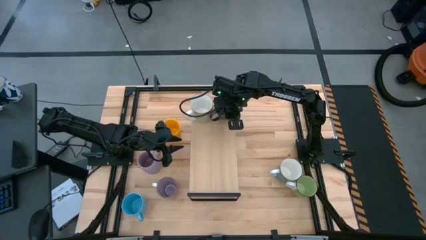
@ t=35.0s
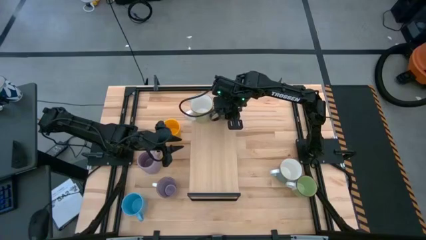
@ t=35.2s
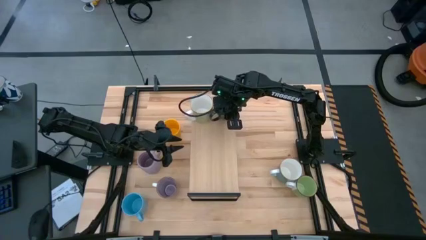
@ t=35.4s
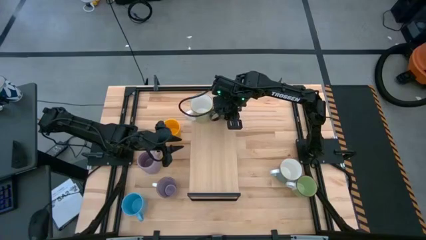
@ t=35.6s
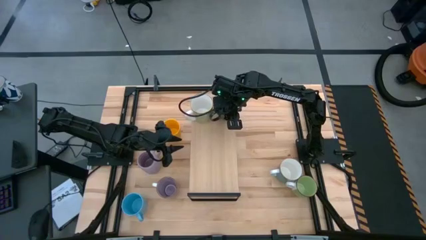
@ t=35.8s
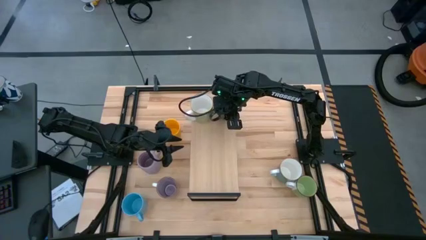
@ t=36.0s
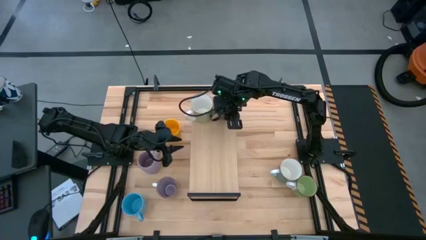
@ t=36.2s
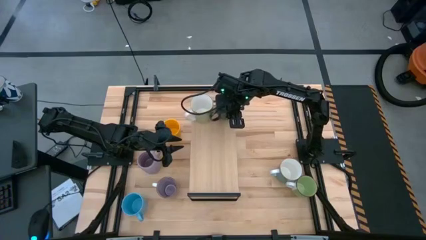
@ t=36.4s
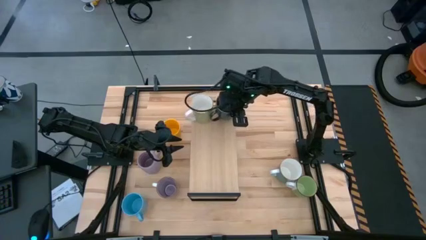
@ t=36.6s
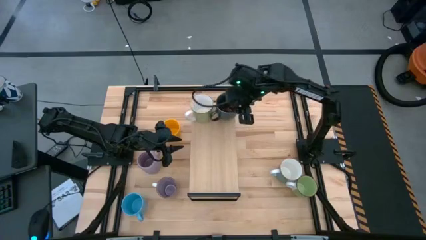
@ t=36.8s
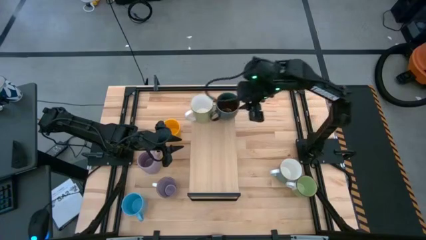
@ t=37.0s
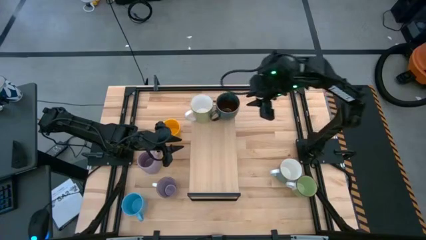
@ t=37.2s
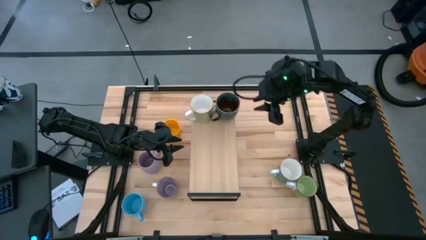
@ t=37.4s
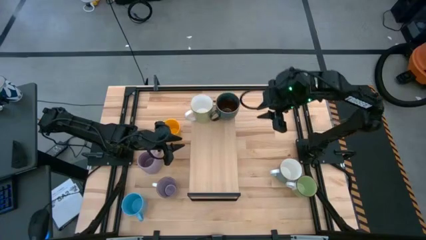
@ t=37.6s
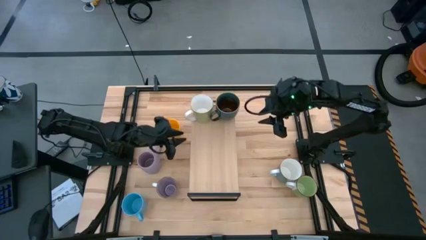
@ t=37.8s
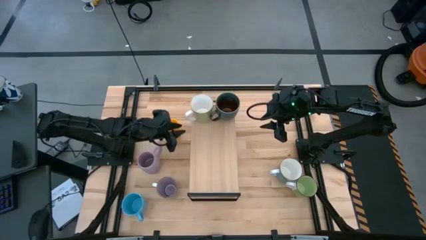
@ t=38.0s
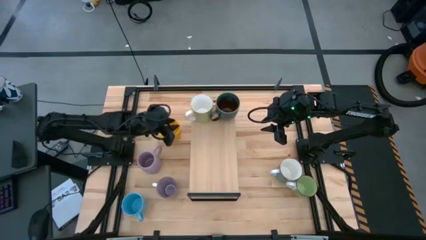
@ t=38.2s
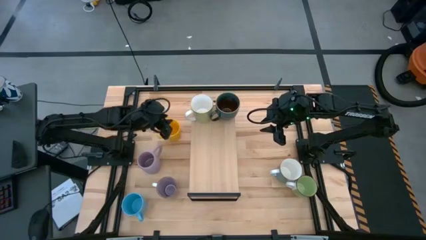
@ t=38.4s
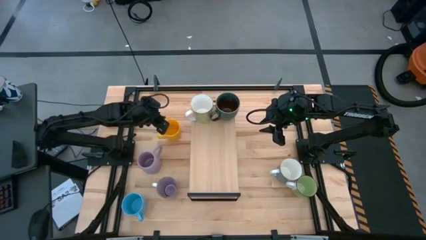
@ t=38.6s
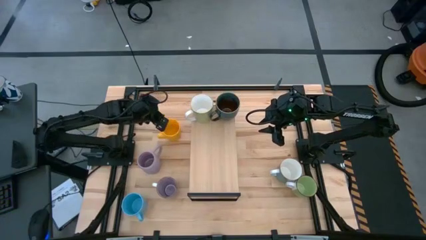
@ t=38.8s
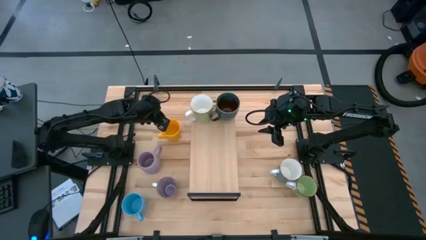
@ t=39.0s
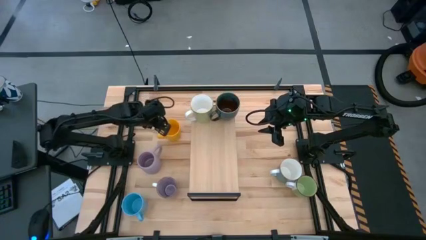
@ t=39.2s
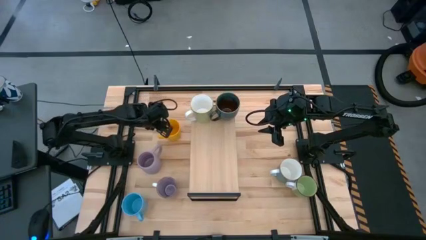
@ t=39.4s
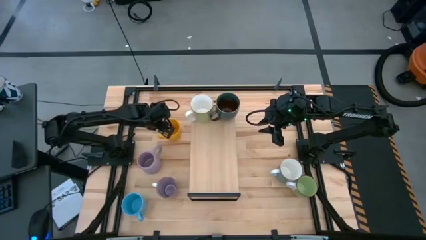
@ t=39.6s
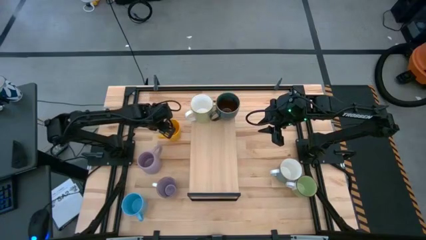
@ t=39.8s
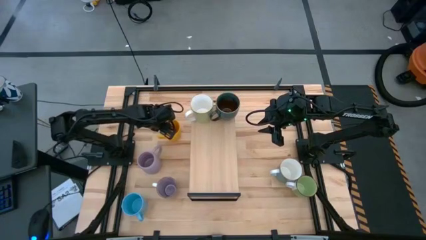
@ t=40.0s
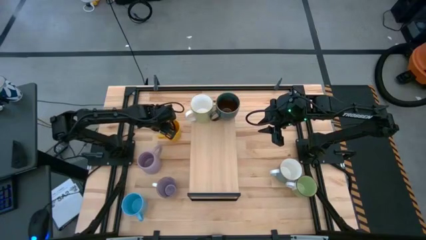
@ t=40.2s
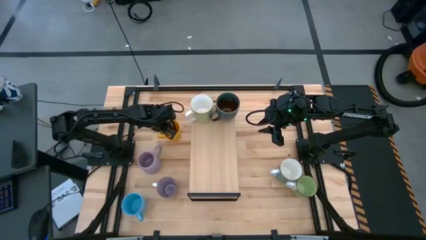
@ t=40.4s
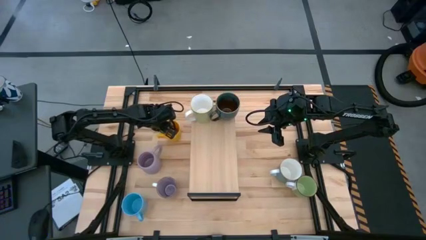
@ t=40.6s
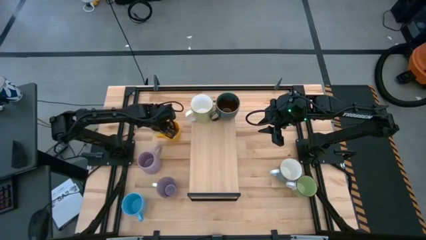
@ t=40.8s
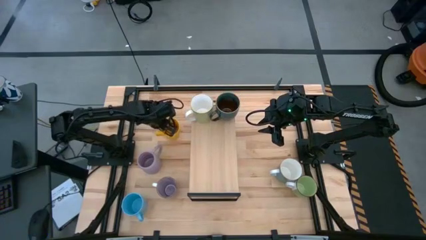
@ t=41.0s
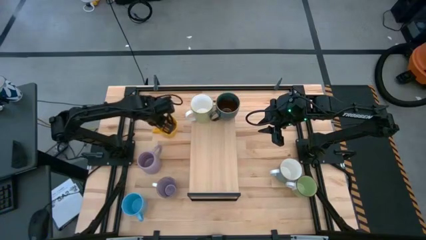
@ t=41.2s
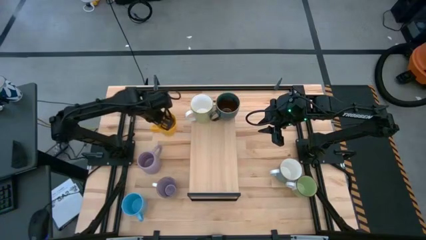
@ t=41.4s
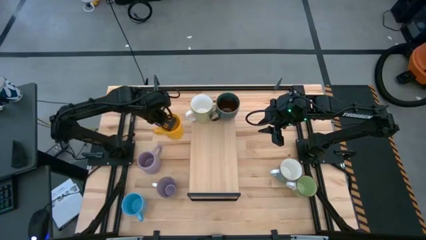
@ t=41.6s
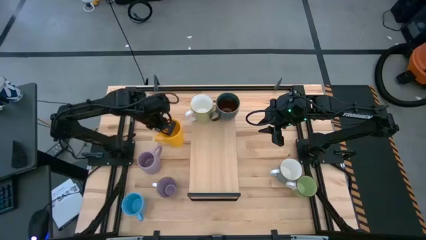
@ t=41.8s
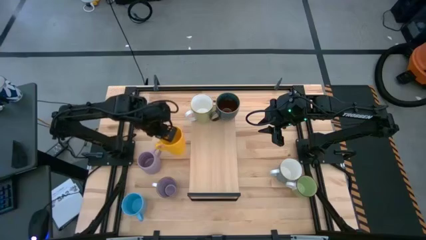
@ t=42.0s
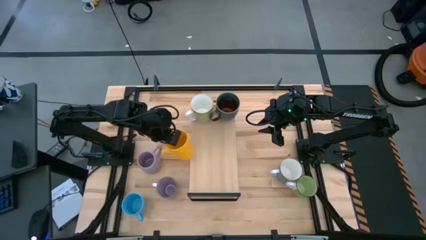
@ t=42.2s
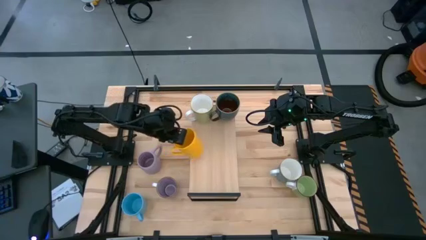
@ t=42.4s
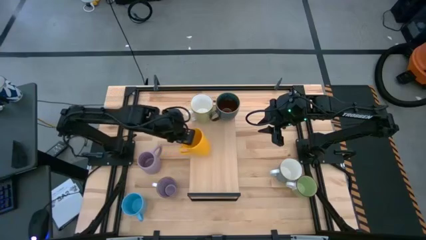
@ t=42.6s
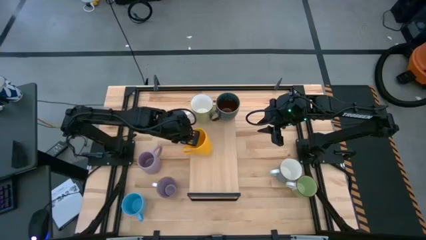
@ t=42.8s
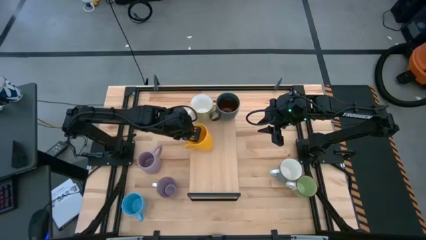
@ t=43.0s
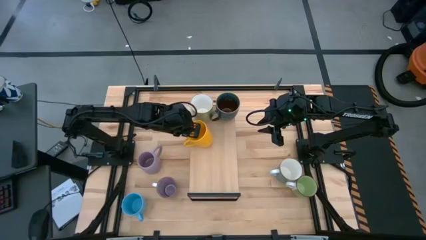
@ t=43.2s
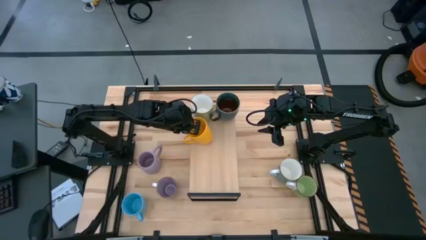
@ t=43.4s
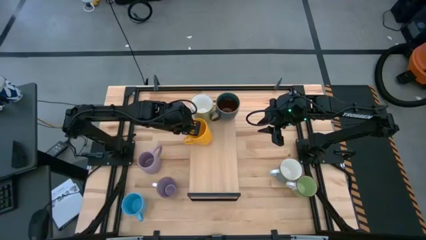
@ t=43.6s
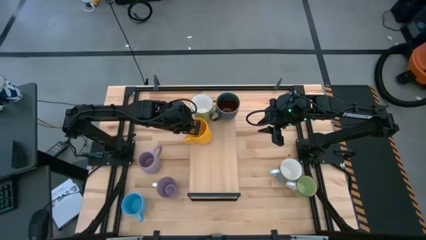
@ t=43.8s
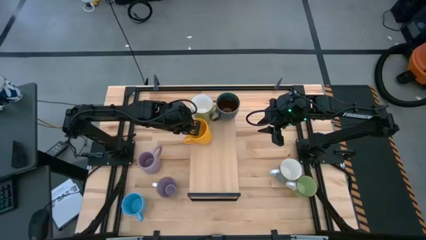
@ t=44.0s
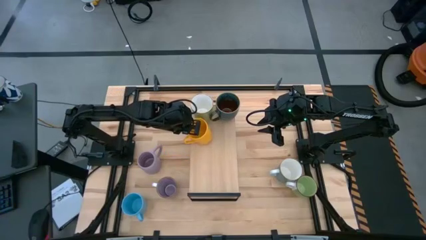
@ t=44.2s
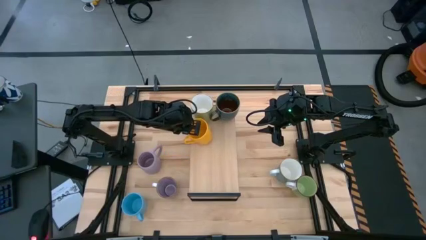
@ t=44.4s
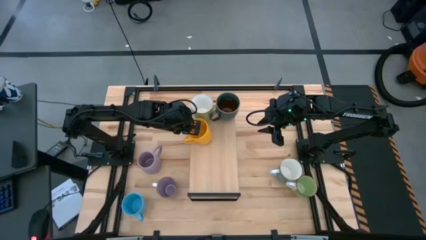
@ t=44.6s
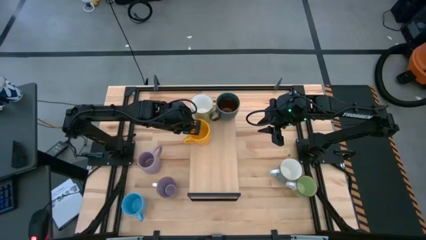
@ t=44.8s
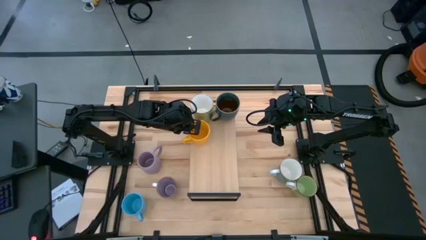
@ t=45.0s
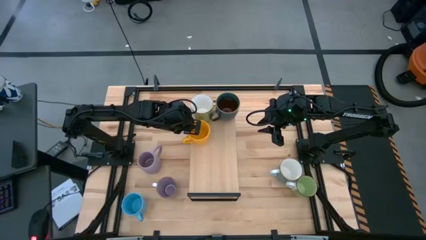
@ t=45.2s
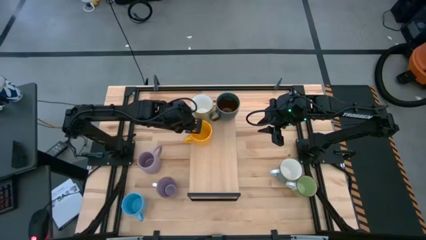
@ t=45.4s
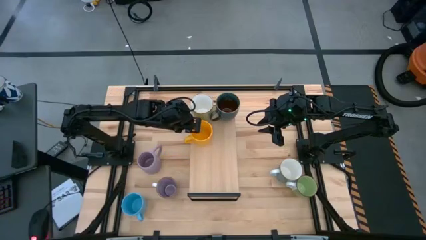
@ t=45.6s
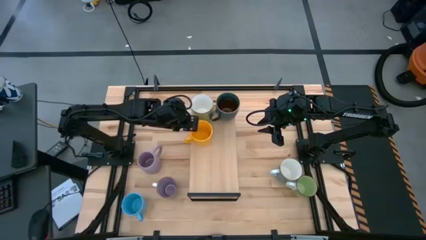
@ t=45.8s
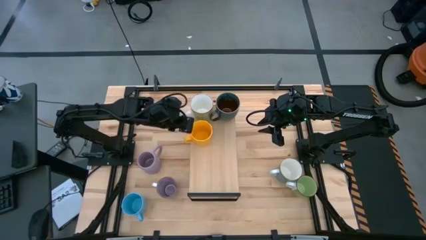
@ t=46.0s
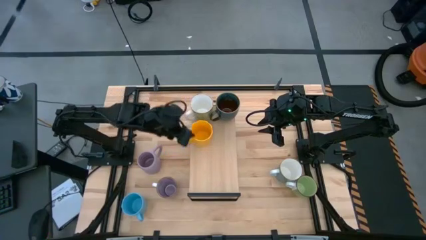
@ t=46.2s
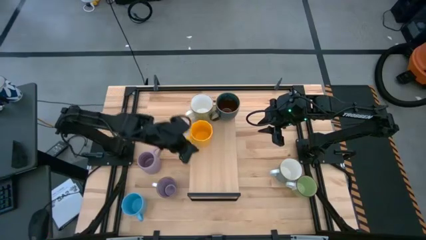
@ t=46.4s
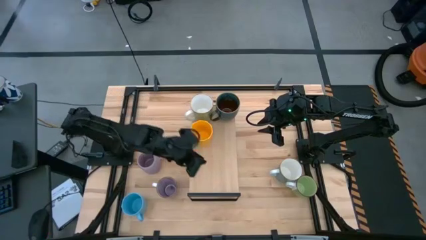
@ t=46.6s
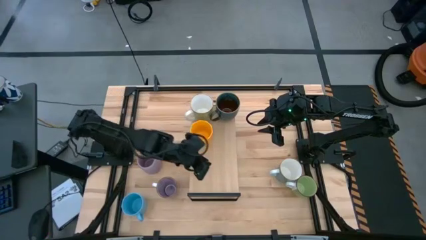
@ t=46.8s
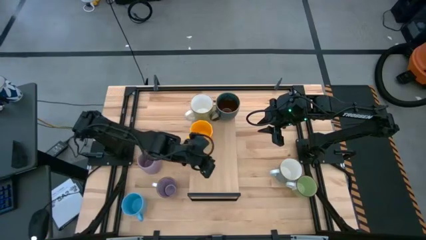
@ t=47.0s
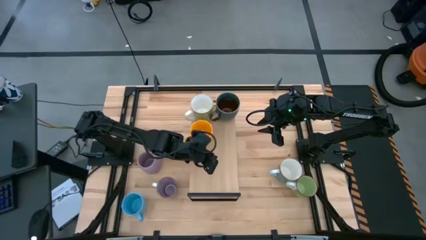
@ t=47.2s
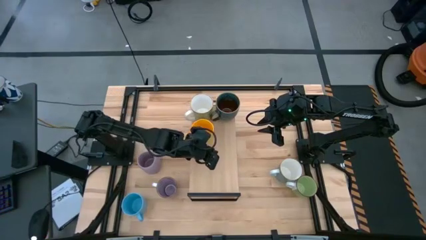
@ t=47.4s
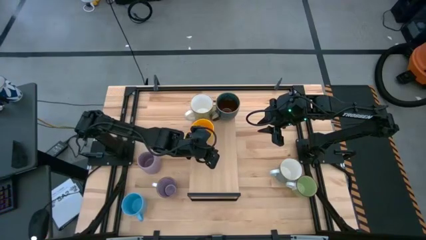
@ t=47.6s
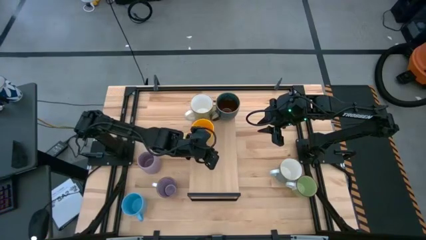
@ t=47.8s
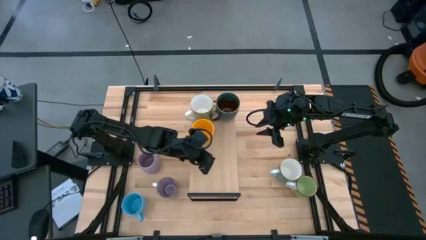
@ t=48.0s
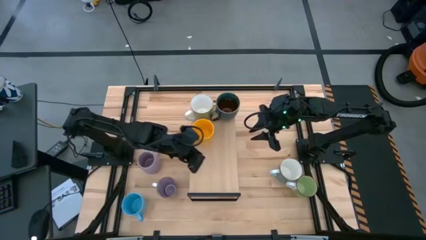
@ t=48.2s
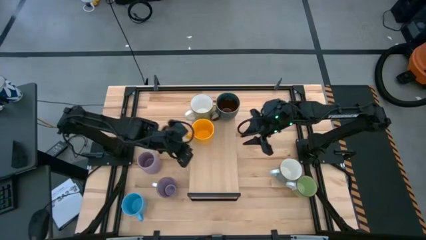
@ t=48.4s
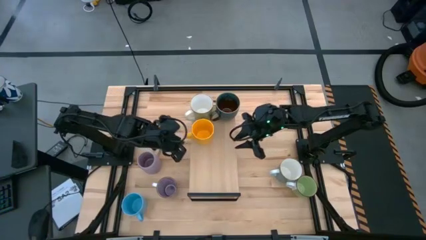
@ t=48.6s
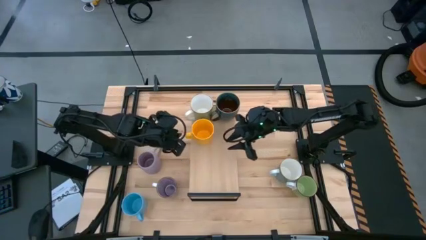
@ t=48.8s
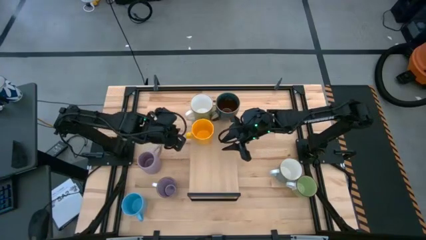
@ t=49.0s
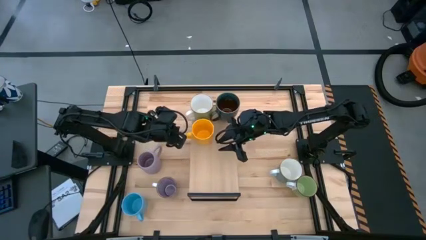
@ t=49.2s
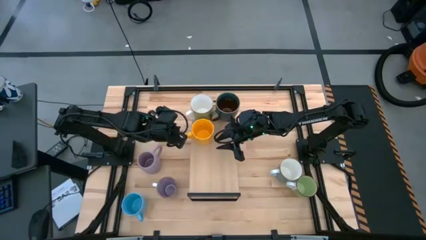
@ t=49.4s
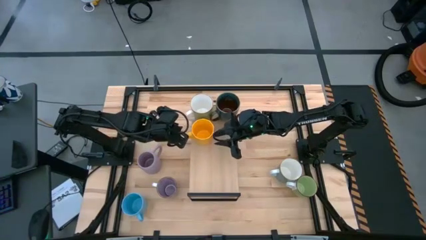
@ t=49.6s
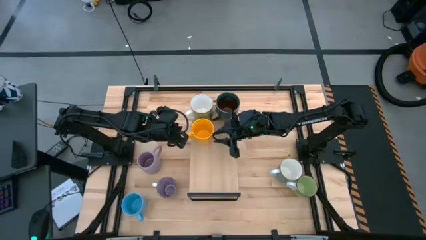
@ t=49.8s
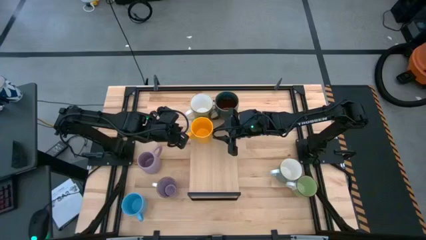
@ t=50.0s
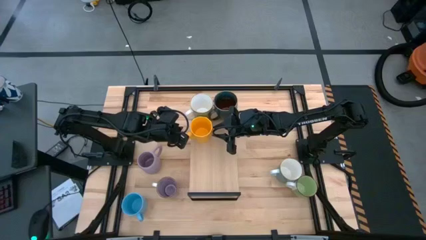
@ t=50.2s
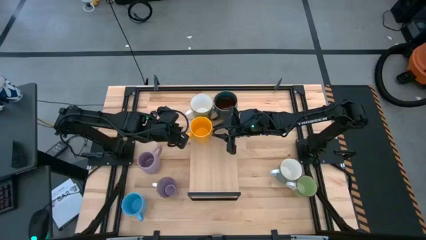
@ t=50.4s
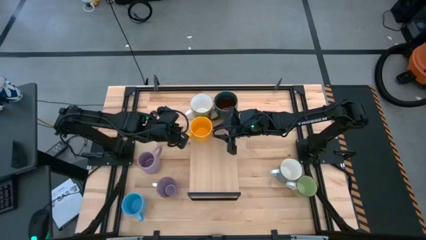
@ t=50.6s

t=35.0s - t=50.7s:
Task: Place coffee mugs
Put the yellow mug on the shelf
